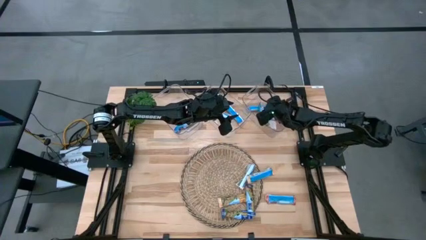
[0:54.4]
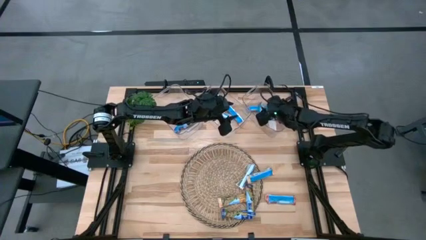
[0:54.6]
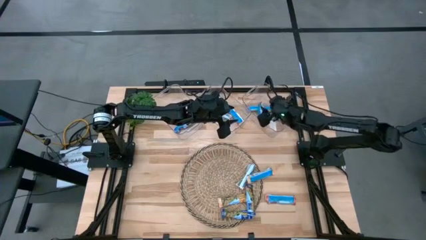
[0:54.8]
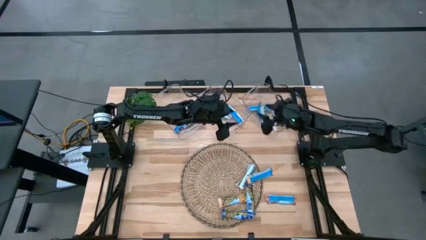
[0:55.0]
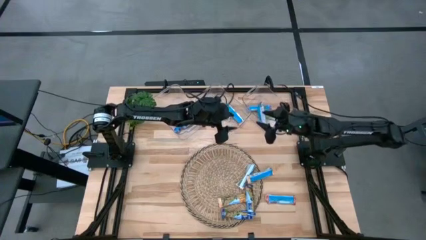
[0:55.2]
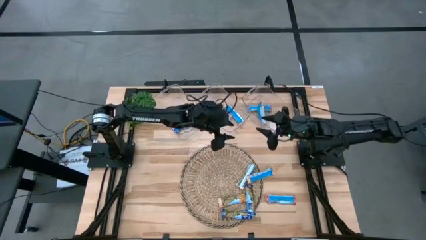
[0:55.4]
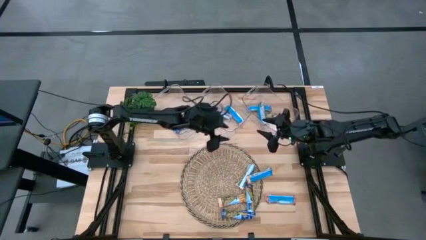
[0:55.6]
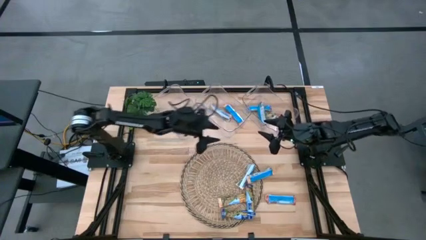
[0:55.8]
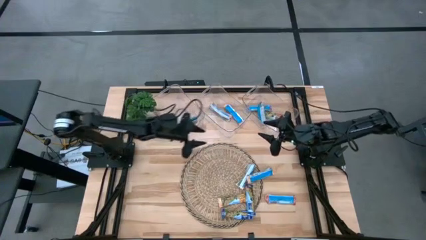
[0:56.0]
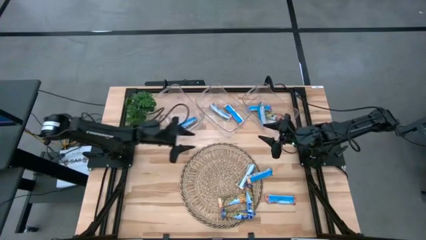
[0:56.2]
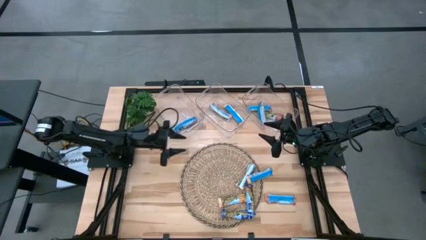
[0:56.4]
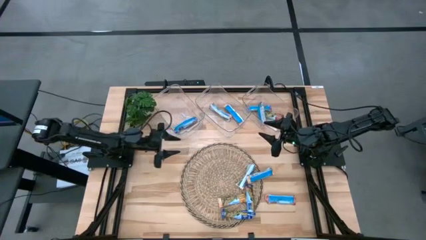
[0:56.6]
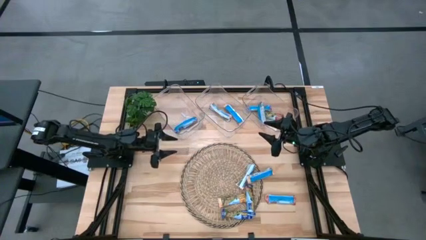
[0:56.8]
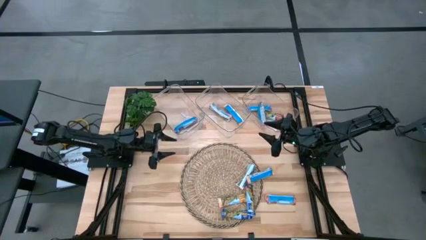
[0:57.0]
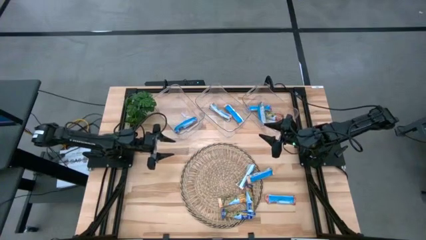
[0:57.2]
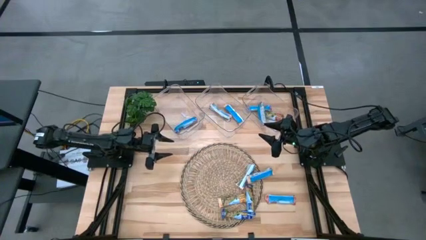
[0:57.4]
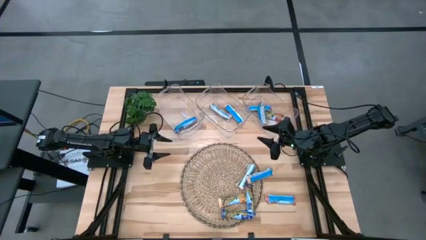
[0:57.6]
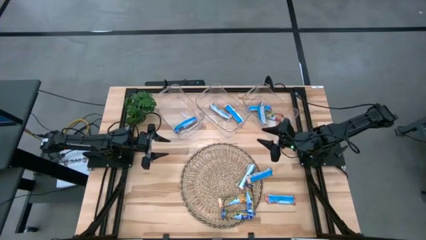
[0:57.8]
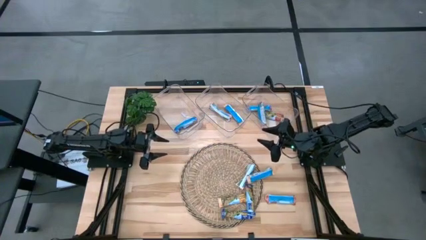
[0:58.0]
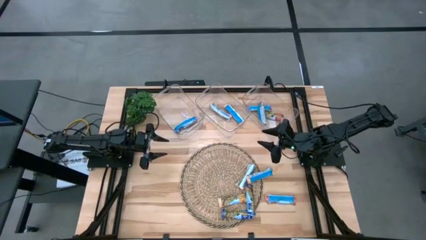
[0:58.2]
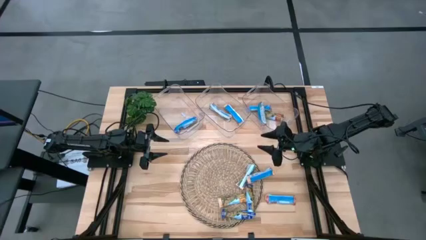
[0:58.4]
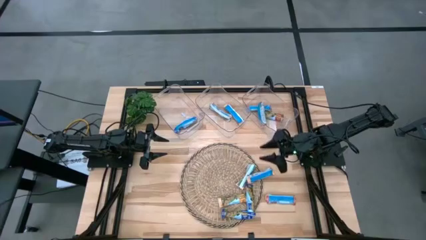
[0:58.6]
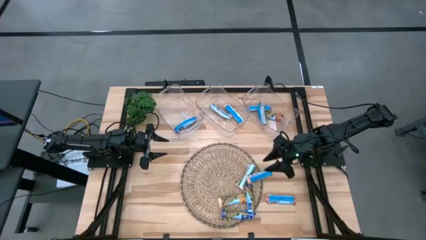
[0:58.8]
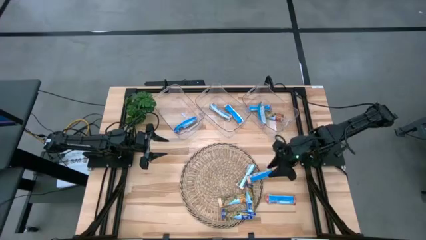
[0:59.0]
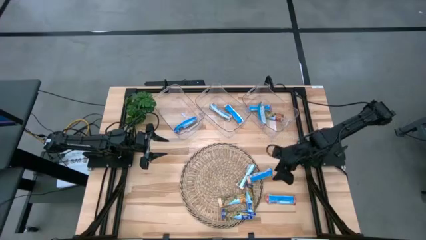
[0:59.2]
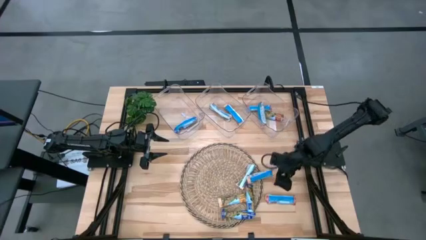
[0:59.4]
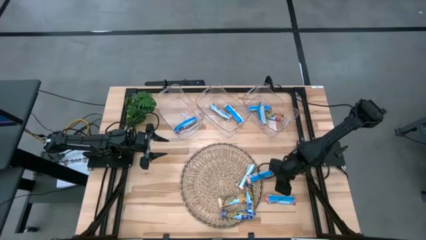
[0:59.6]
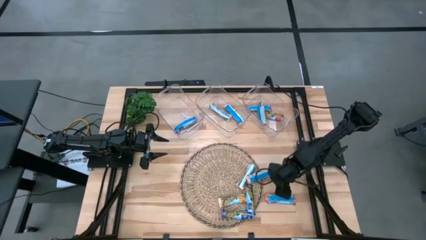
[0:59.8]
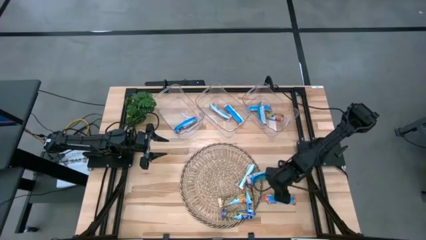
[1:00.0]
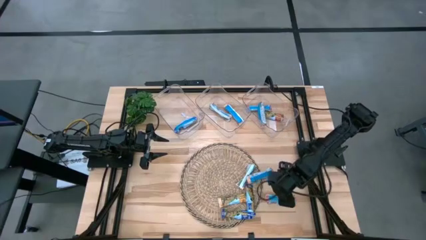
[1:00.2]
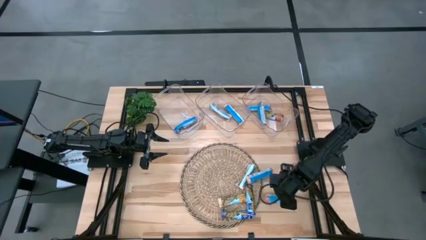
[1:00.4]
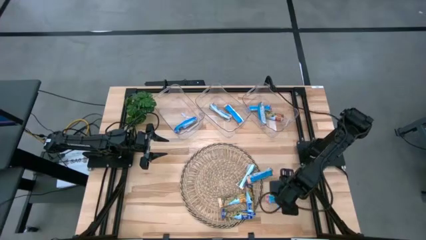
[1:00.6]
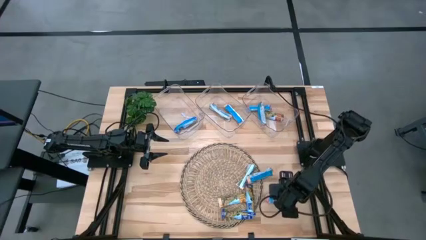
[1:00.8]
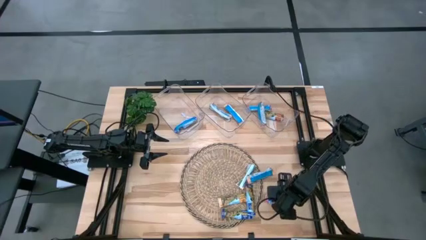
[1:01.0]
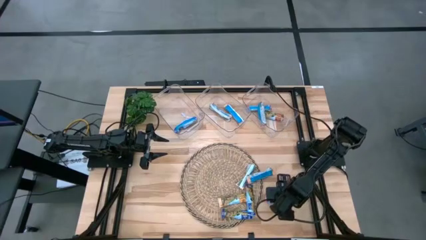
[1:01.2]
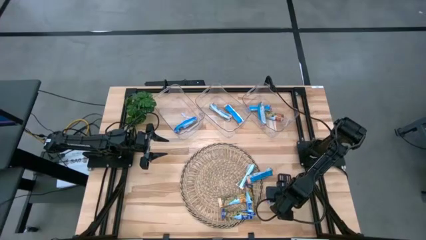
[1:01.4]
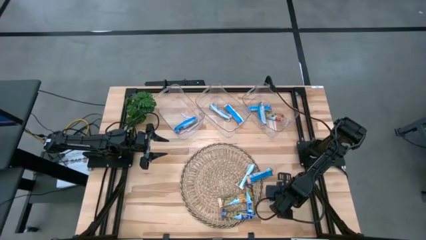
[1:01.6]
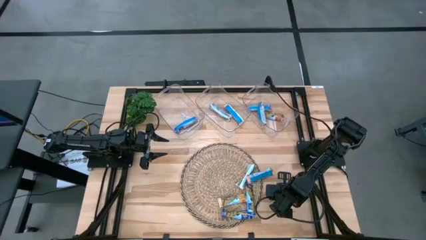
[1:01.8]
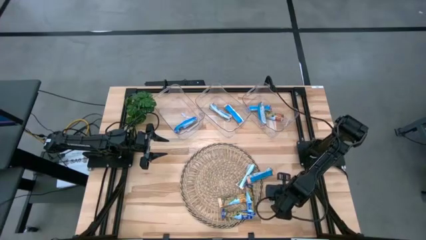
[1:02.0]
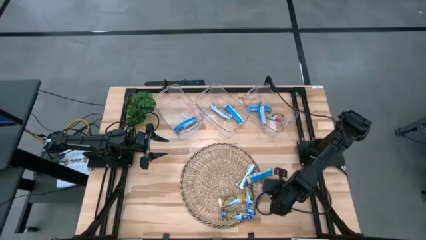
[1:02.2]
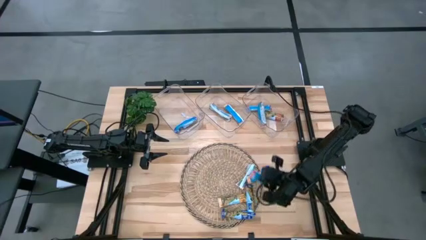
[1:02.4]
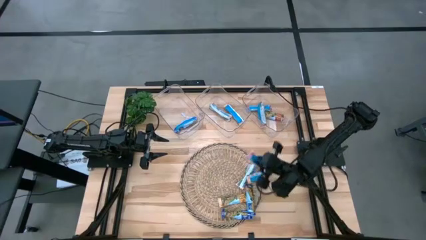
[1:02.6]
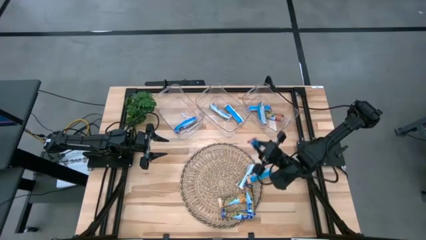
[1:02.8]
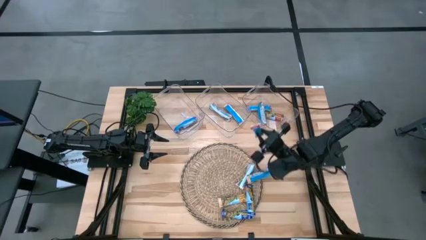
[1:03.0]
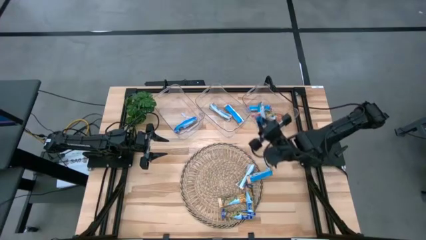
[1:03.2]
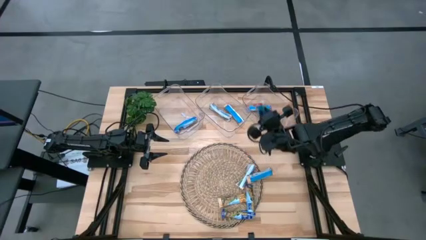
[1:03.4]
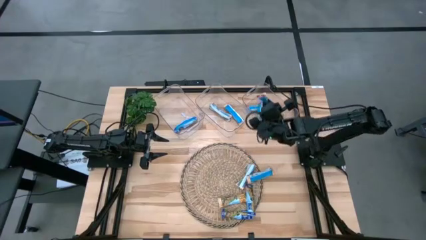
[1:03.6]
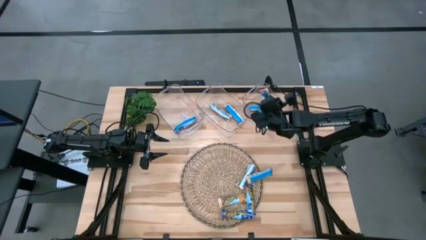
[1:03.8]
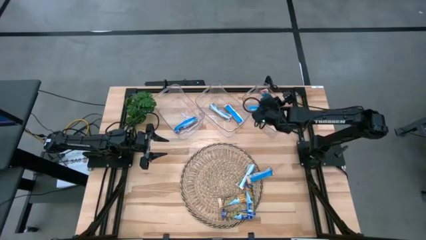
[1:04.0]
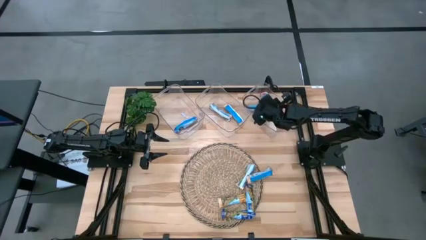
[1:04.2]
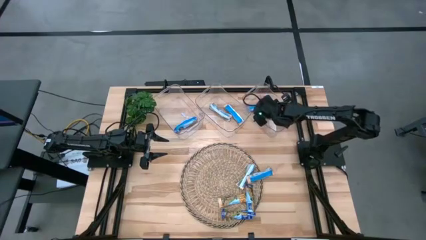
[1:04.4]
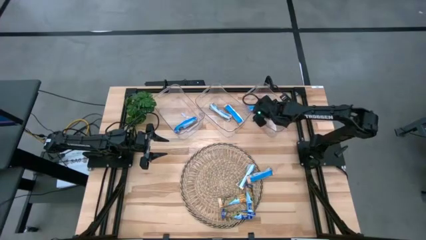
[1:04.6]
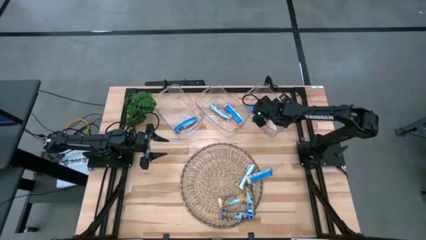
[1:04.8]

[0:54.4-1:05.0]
Task: Pick and place Granola Bars by type
Put the red granola bar into the right transparent bin

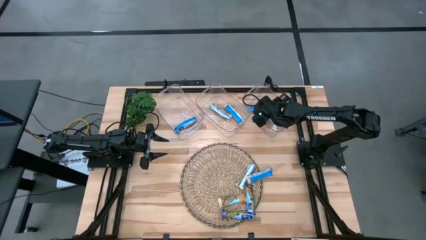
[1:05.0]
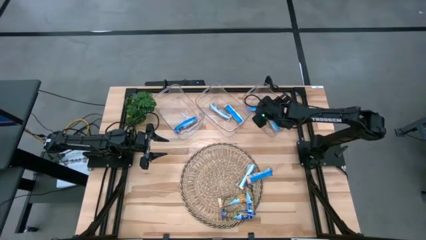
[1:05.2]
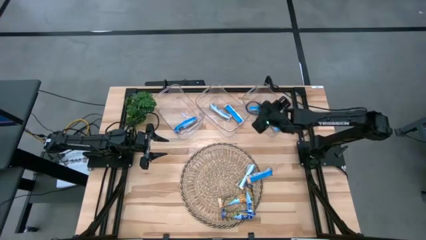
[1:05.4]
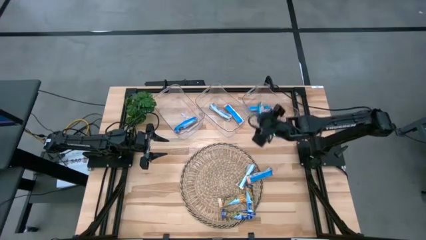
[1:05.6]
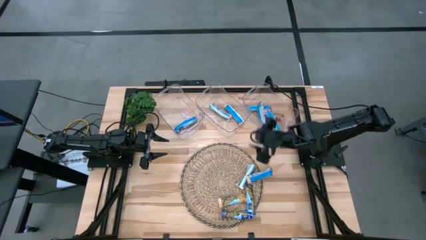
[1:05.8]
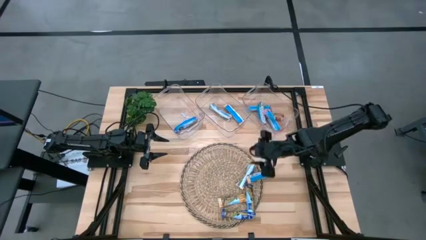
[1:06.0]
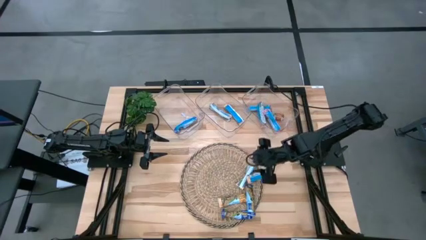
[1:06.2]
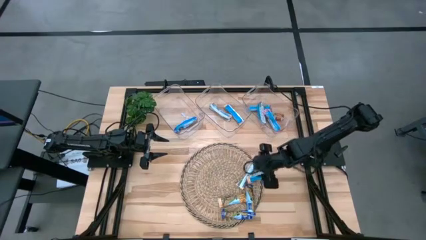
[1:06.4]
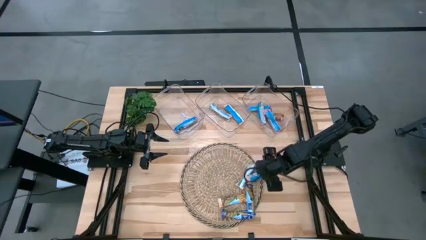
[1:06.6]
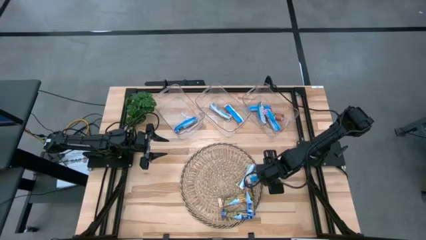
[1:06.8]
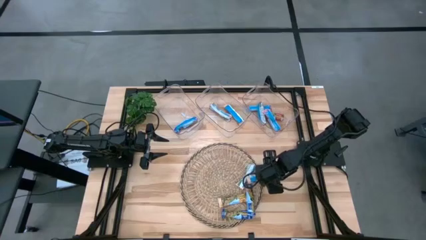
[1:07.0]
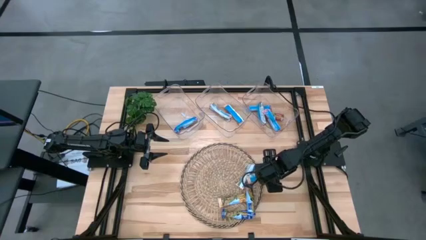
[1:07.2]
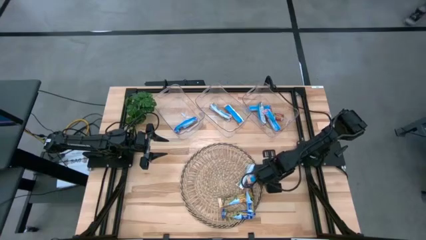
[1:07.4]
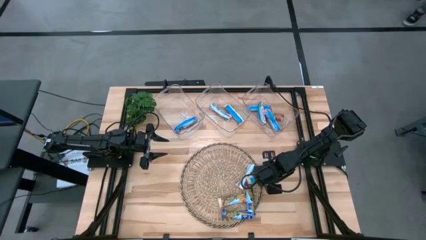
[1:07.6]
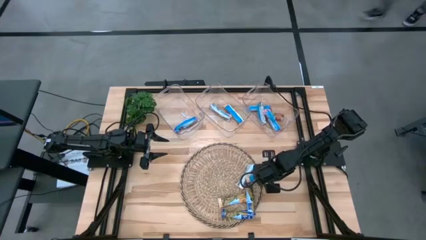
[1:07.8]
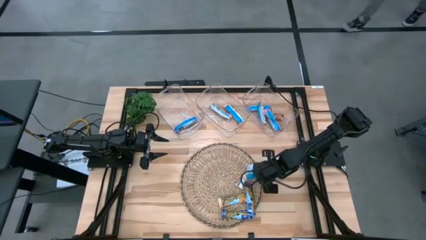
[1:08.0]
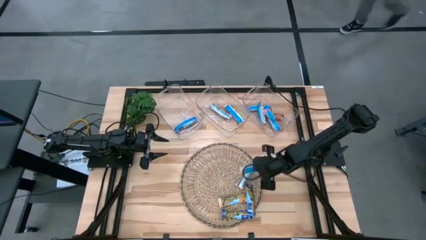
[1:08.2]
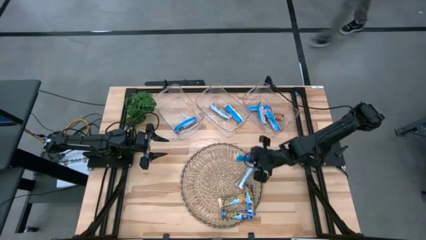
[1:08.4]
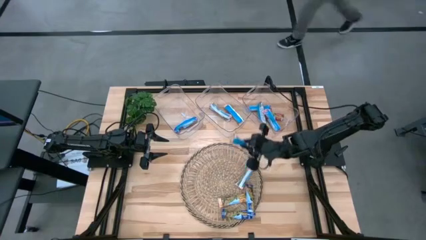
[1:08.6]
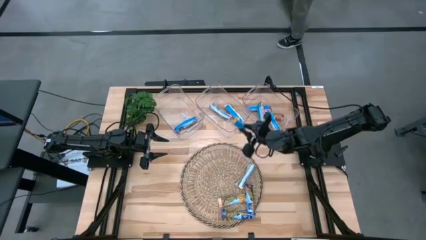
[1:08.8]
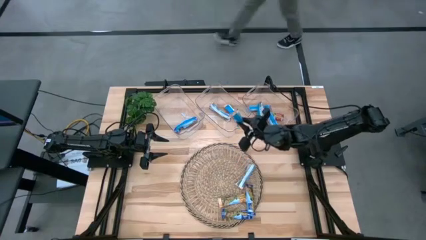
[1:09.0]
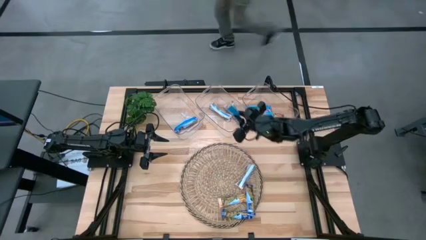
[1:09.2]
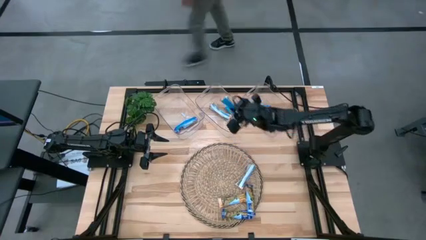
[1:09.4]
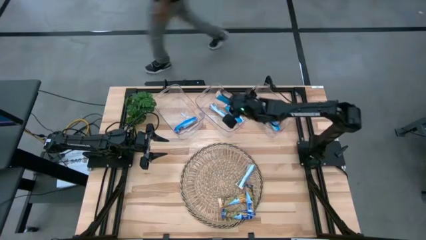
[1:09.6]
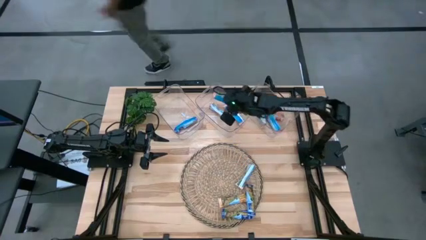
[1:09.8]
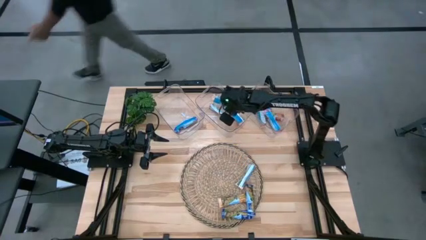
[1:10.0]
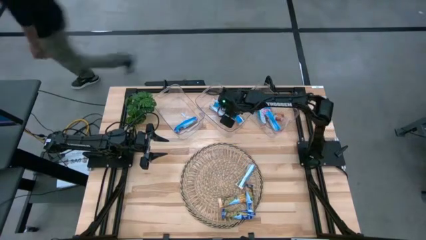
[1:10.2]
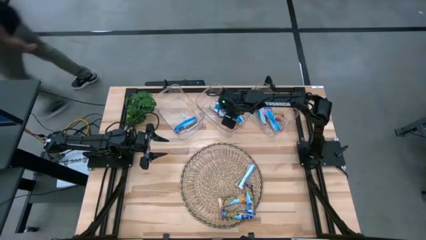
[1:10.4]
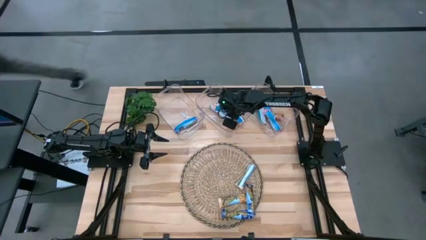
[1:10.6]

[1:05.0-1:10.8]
Put the yellow granola bar into the middle transparent bin

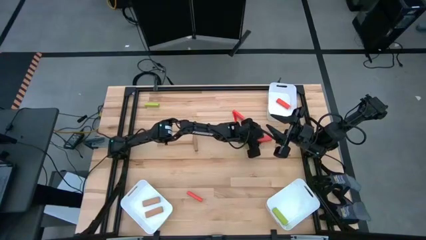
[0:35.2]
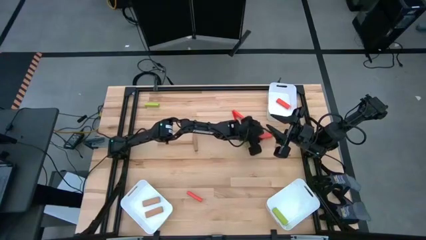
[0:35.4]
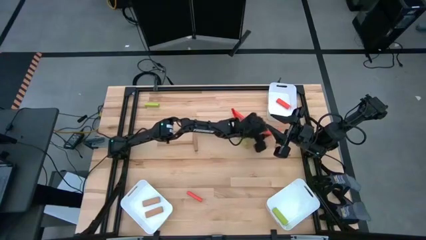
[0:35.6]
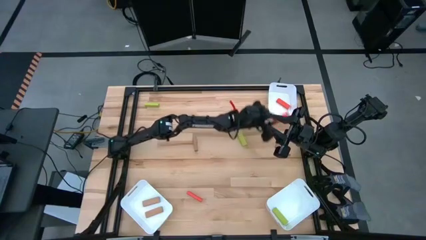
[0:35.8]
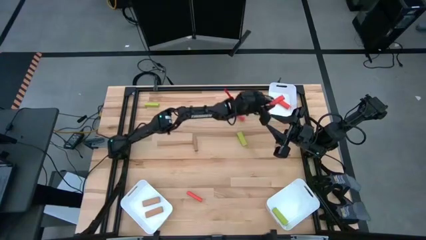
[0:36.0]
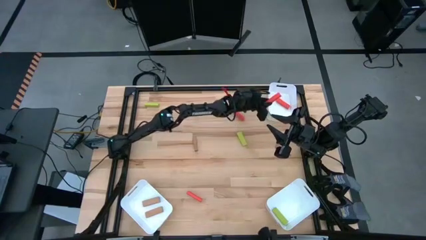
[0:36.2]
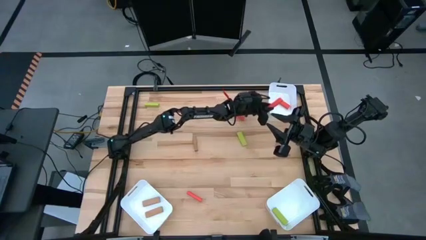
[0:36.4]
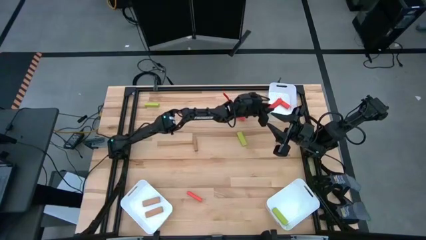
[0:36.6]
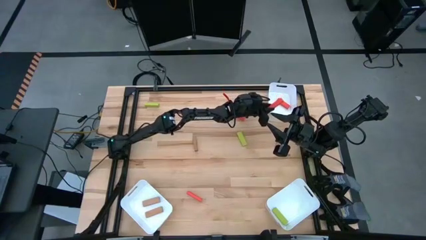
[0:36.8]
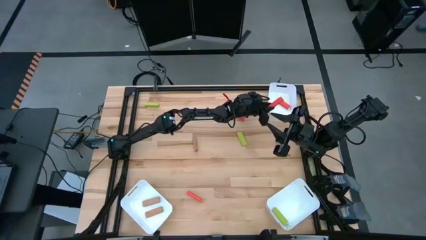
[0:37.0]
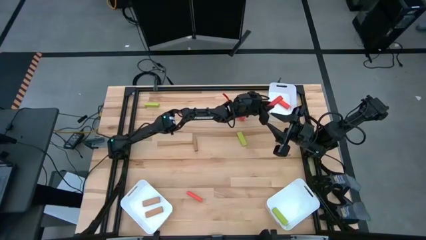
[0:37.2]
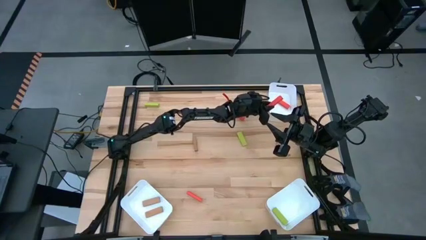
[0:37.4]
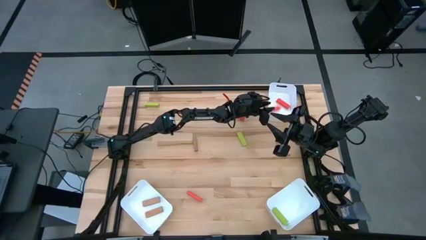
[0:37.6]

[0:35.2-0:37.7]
Task: Sort blocks
Put the middle orange block into the top right bin
